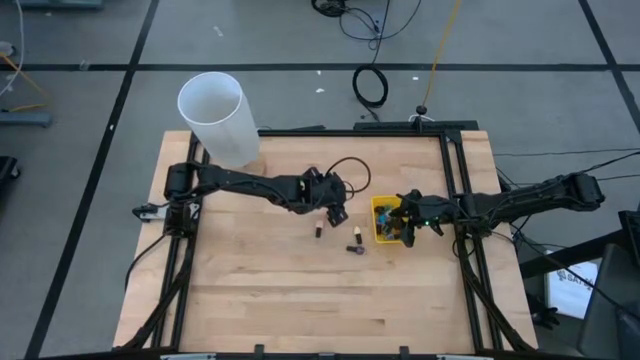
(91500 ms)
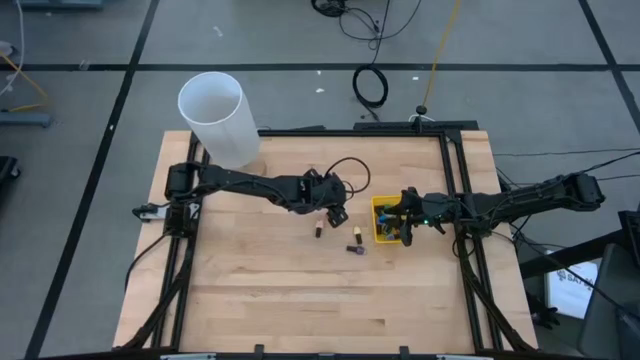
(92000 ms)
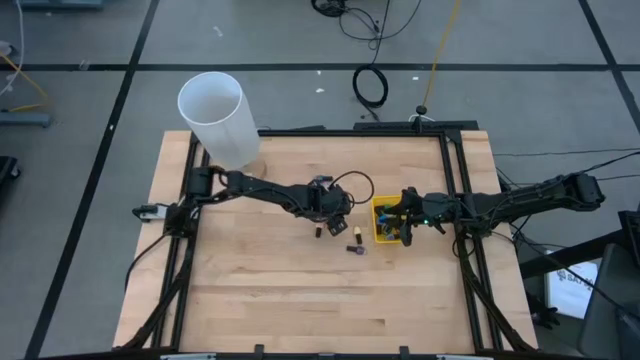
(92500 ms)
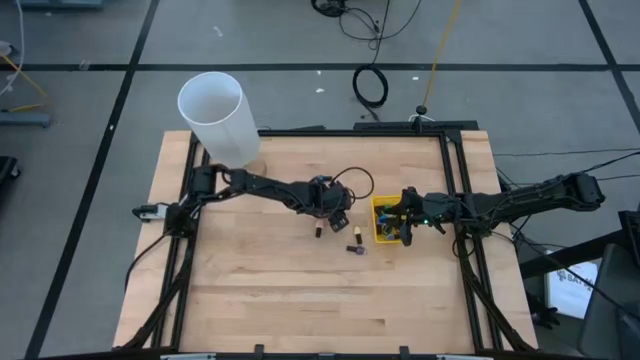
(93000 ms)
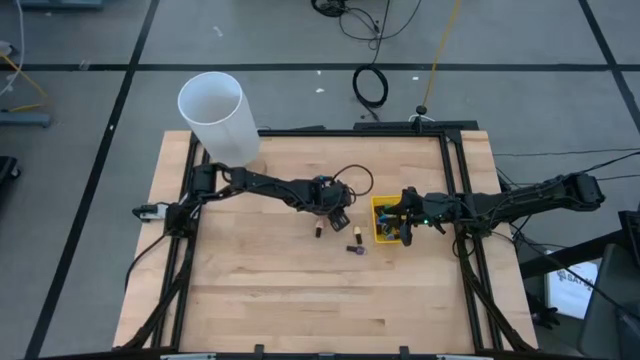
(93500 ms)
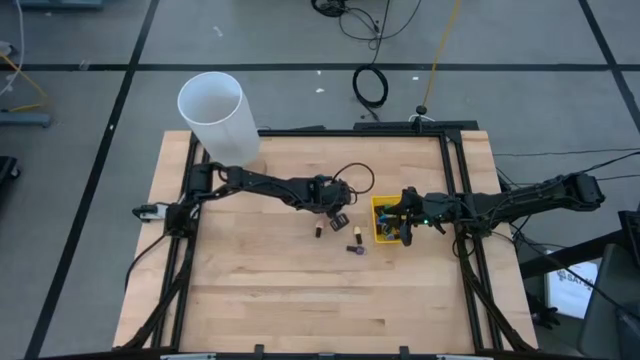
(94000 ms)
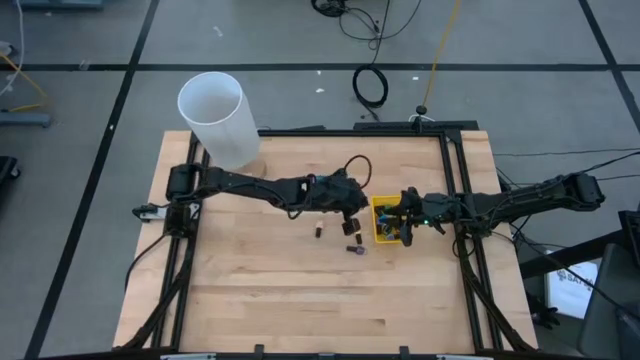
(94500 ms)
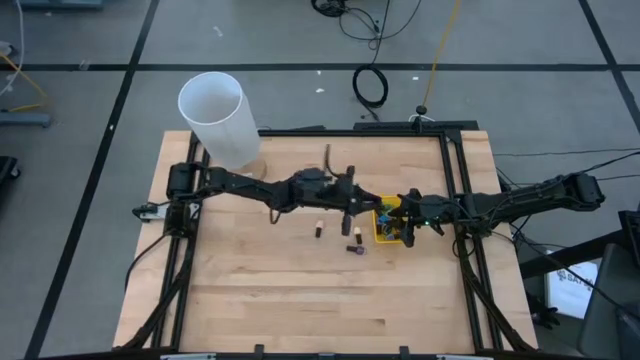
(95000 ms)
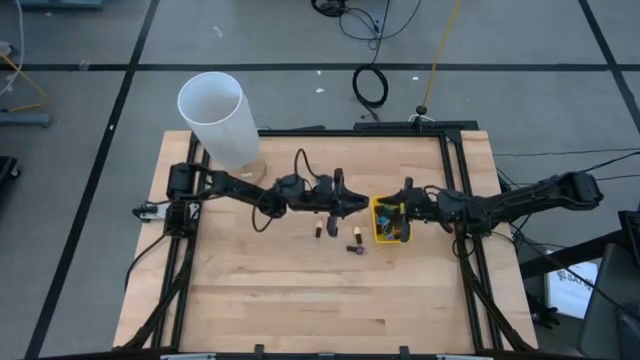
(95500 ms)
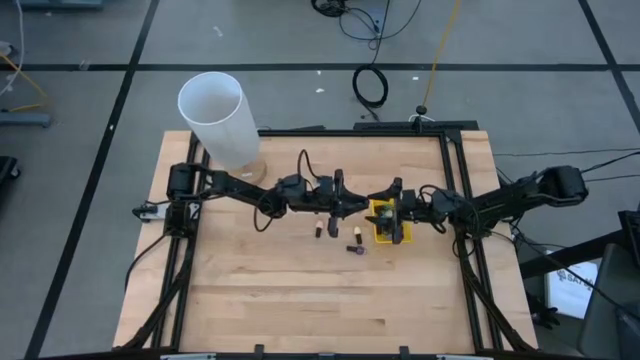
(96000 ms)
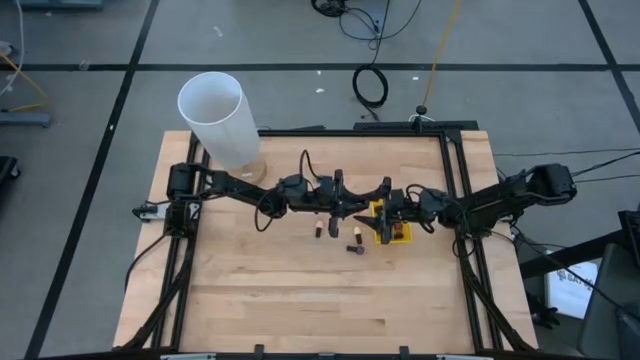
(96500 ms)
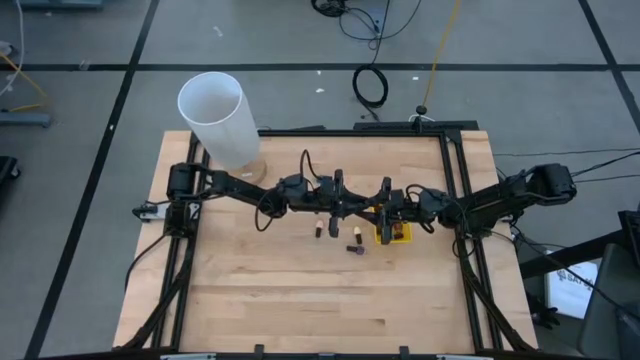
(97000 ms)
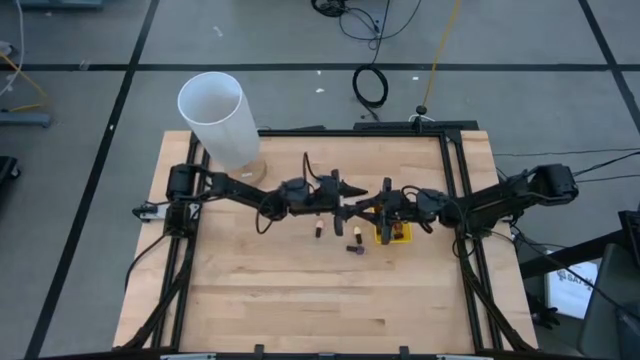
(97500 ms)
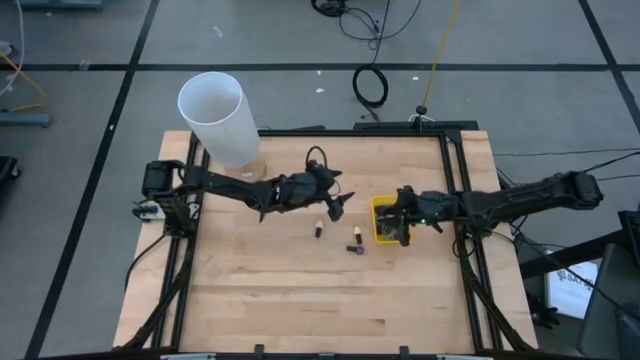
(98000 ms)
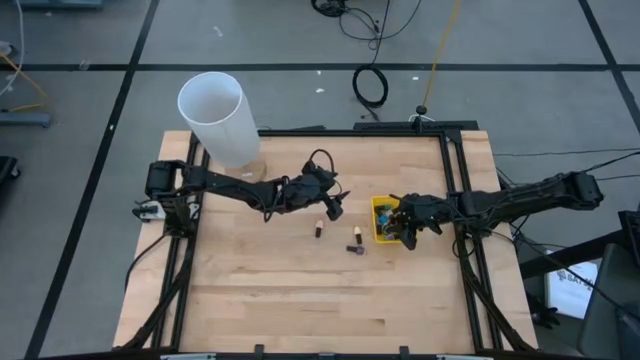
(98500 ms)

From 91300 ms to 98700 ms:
Task: Pick & Place Nail Polish
Put the dark pink nail polish into the yellow bin

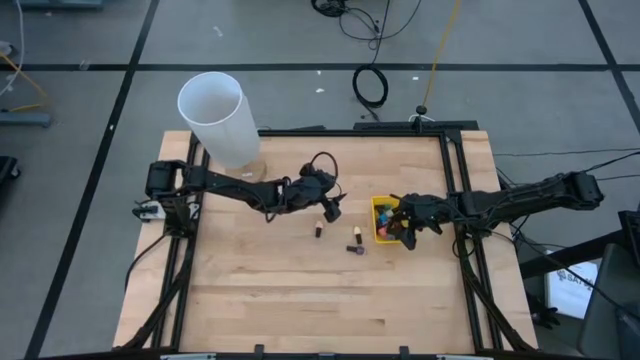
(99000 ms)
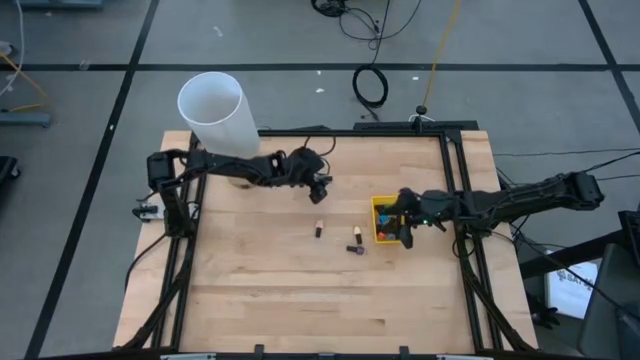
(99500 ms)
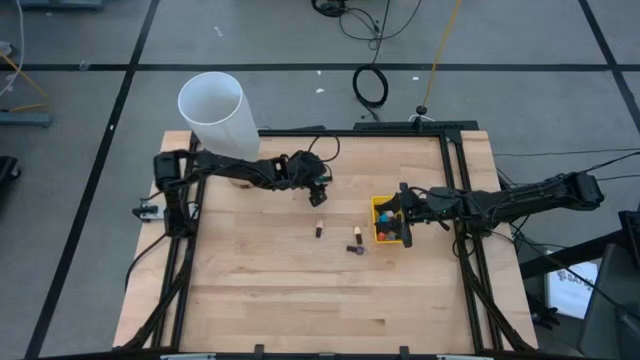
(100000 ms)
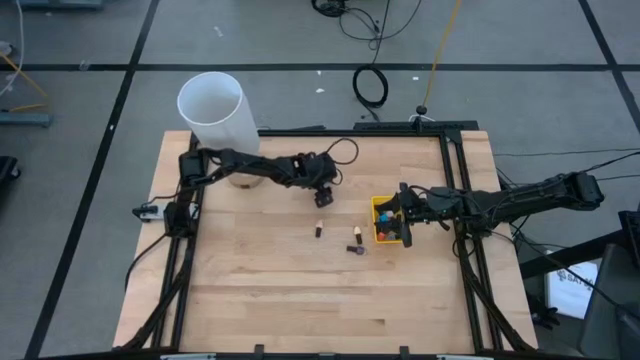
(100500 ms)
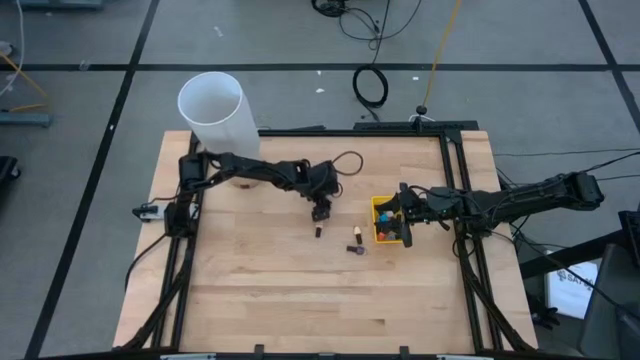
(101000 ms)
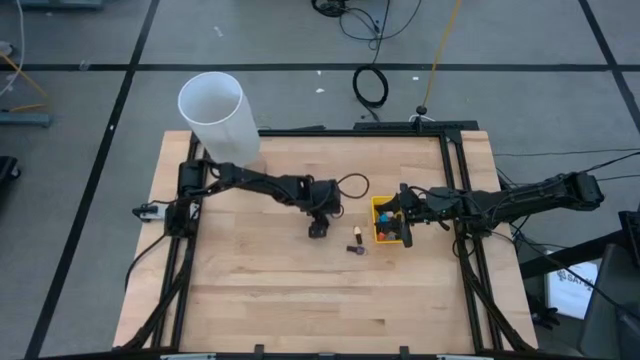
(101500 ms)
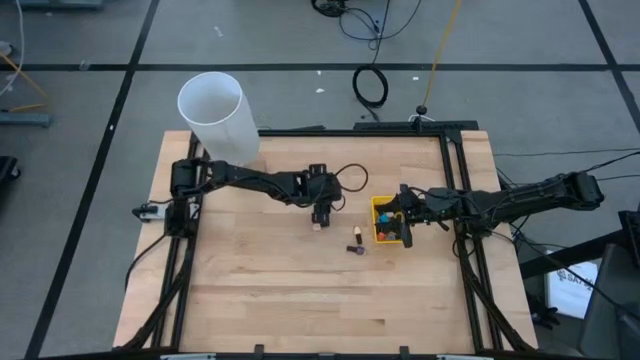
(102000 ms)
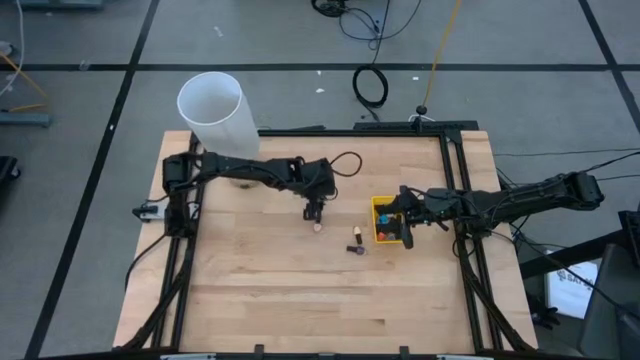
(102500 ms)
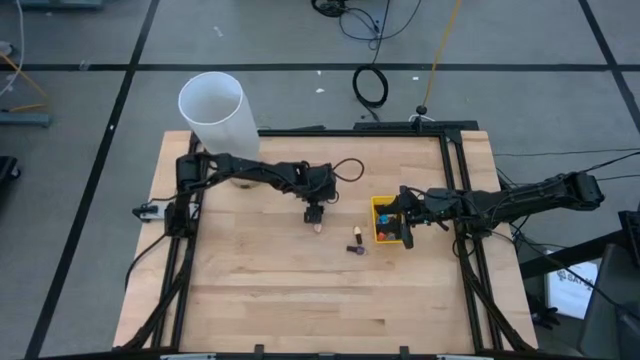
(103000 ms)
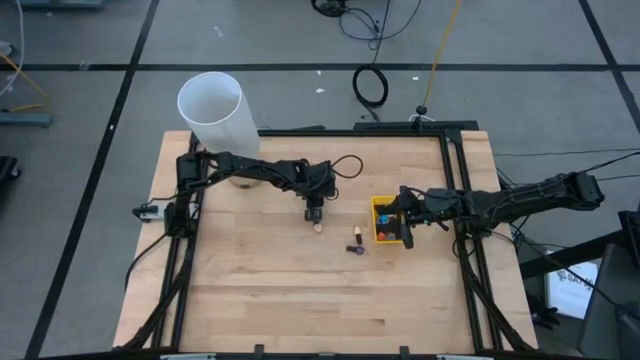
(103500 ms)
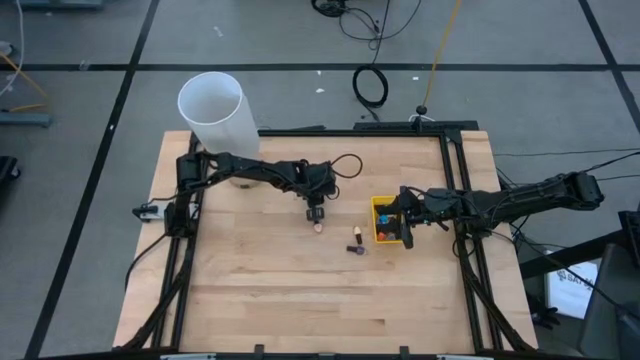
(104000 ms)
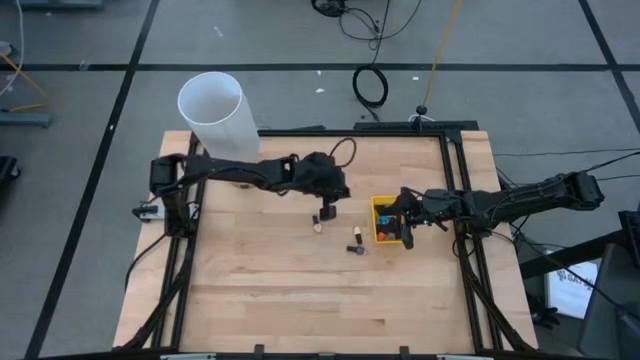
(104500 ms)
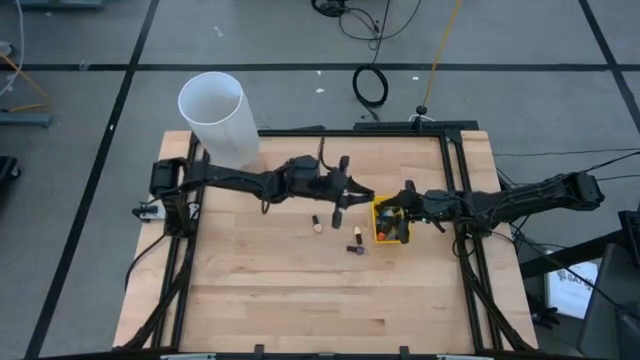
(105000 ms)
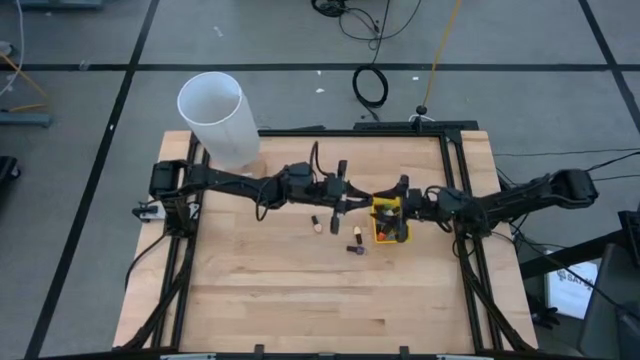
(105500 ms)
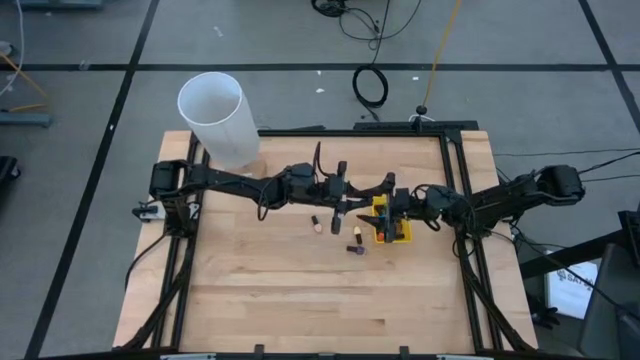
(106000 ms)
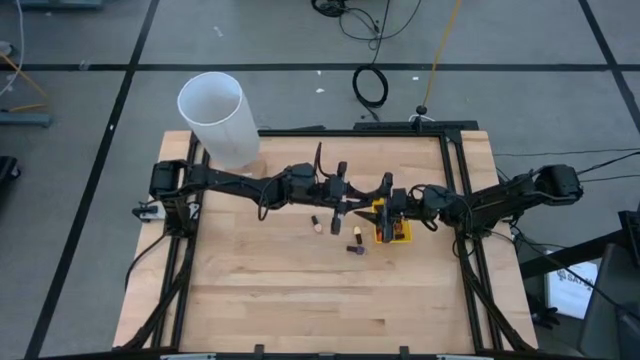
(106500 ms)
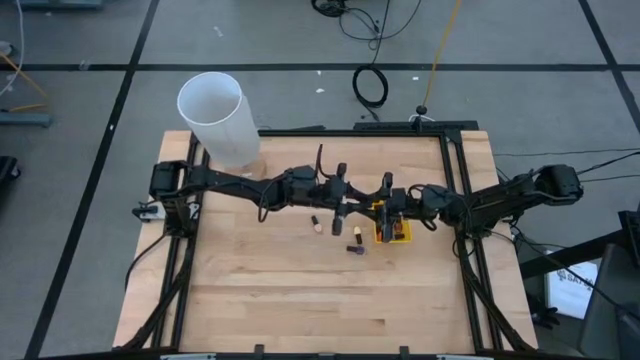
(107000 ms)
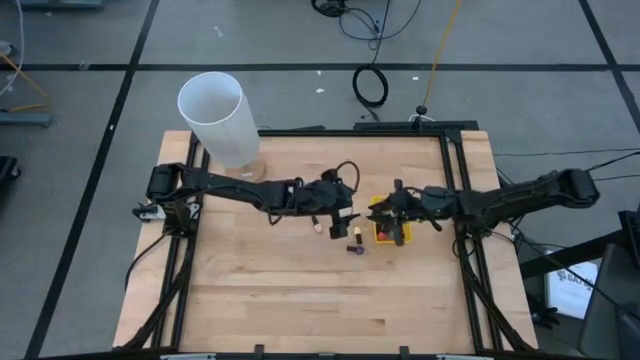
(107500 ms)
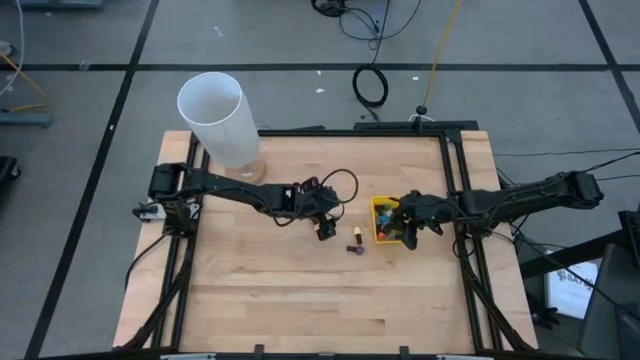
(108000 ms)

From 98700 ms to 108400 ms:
Put the dark blue nail polish into the yellow bin

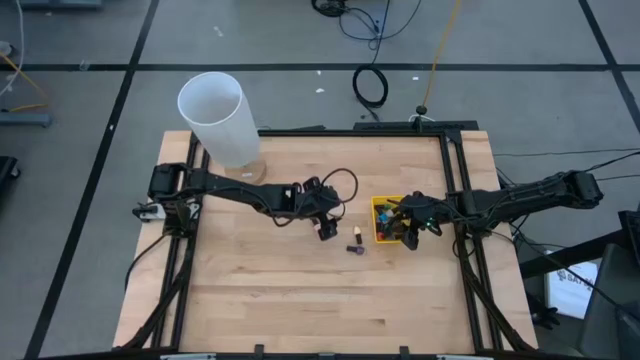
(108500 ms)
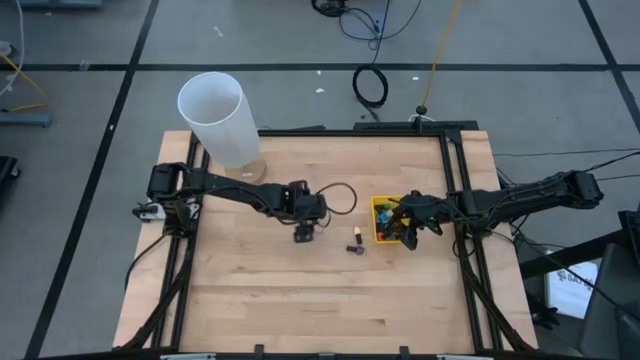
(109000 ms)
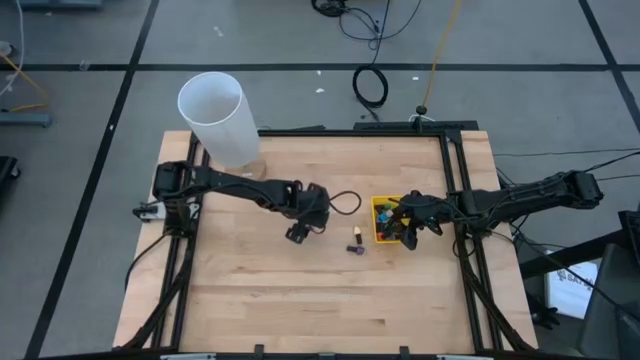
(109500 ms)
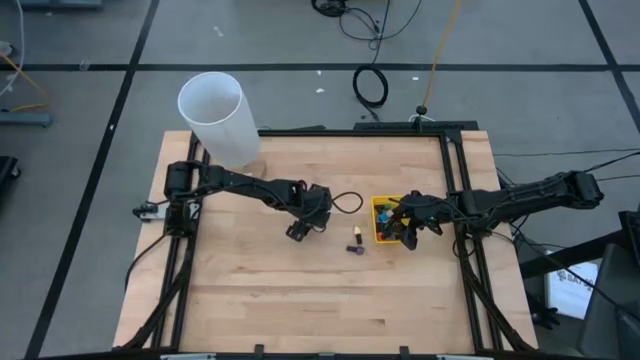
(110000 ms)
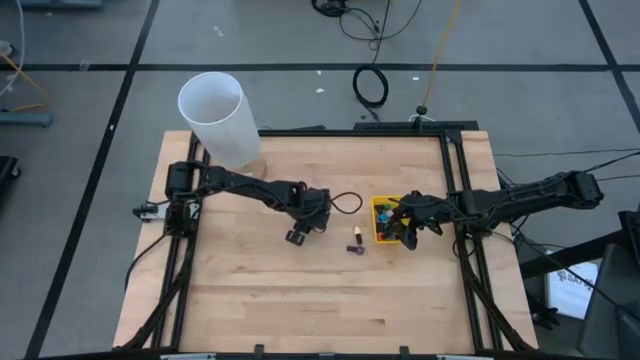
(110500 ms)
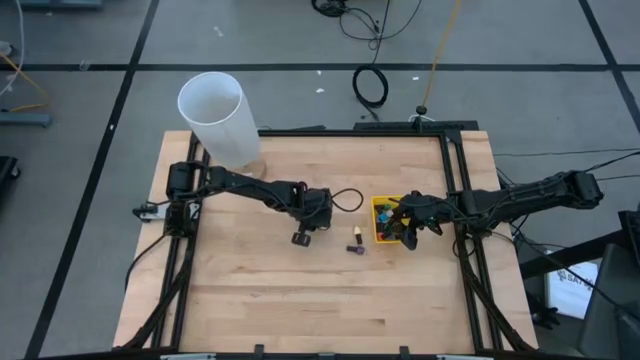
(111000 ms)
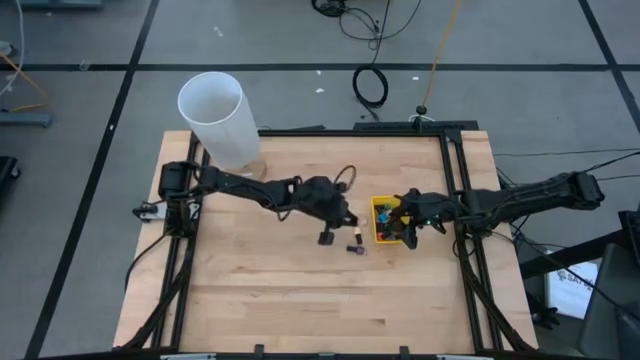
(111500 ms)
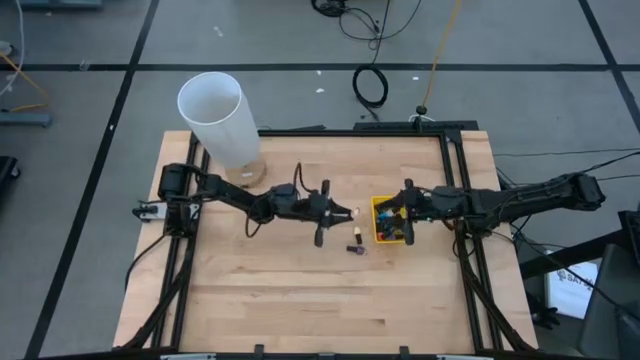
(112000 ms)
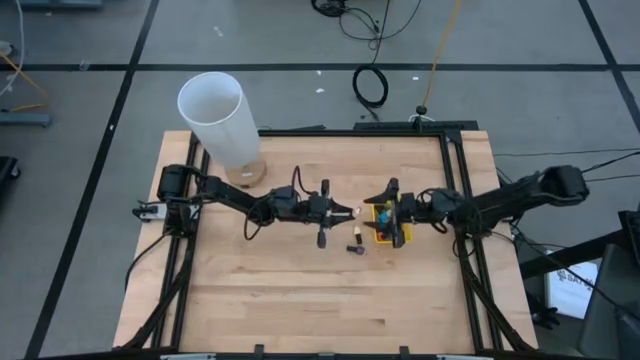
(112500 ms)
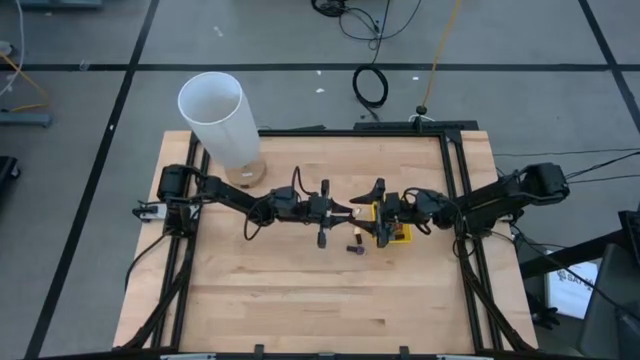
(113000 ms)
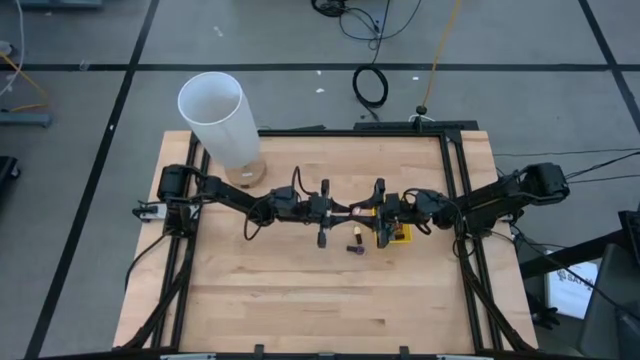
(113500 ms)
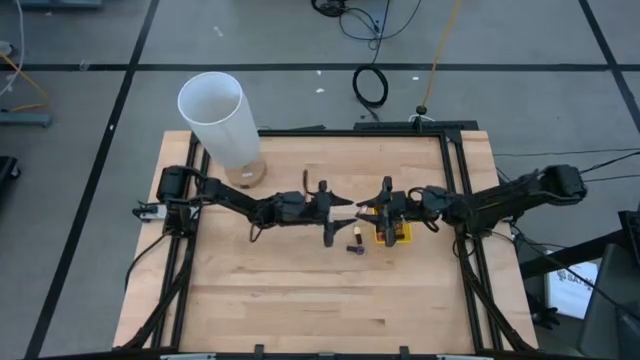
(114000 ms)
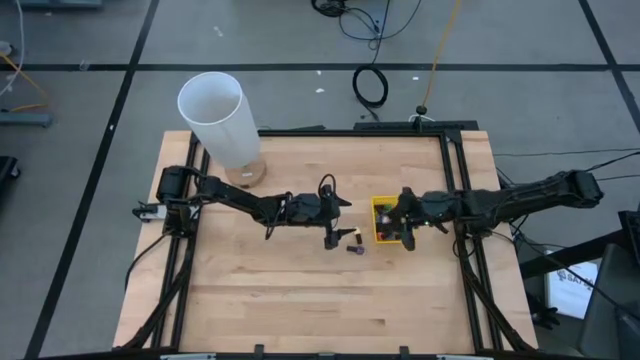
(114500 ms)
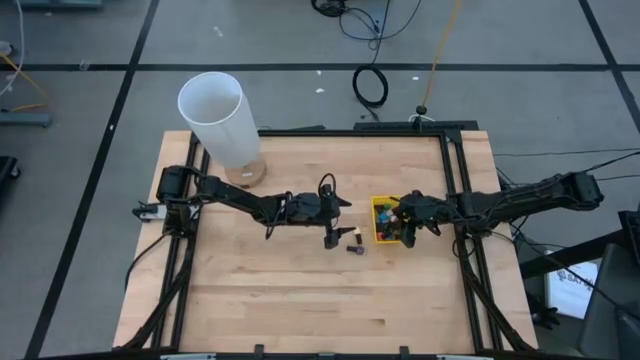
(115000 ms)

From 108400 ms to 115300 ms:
Put the light pink nail polish into the yellow bin
